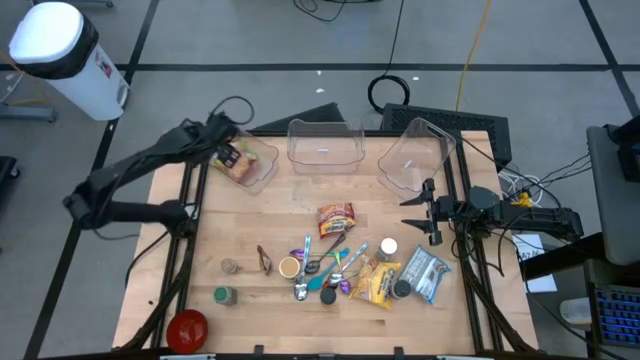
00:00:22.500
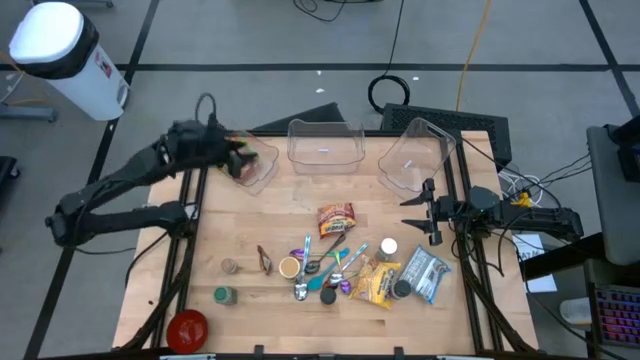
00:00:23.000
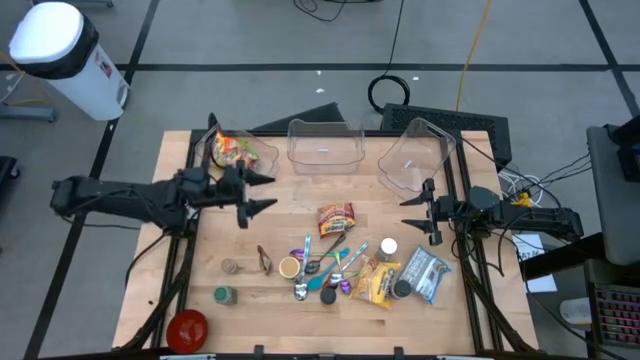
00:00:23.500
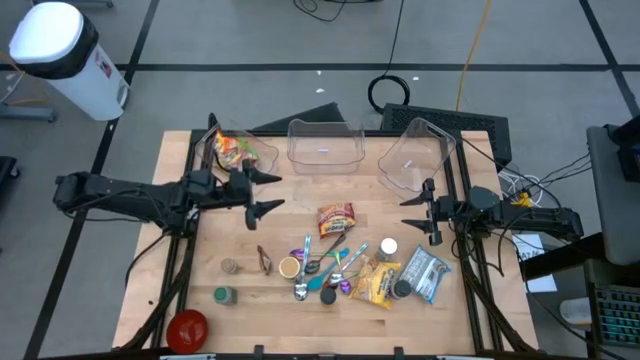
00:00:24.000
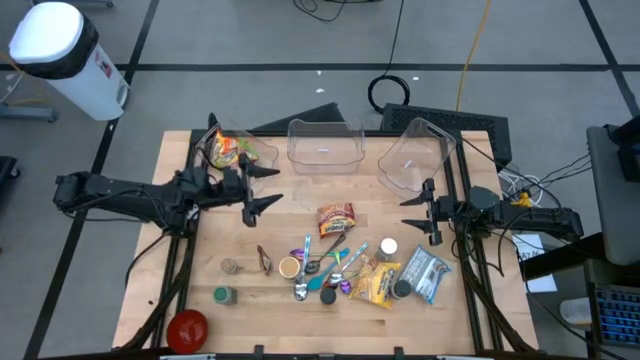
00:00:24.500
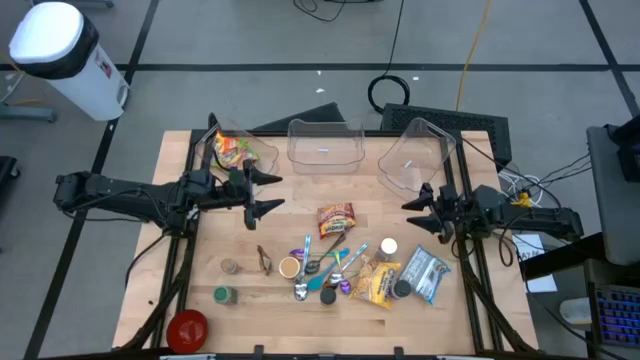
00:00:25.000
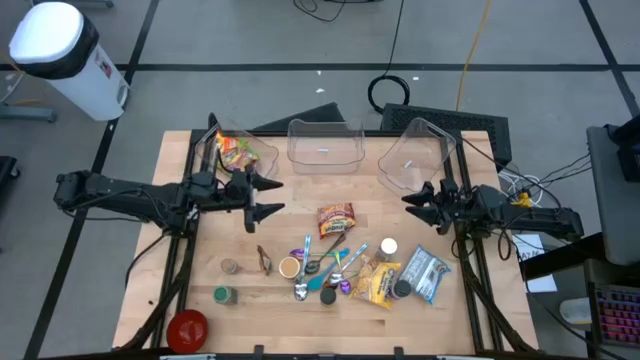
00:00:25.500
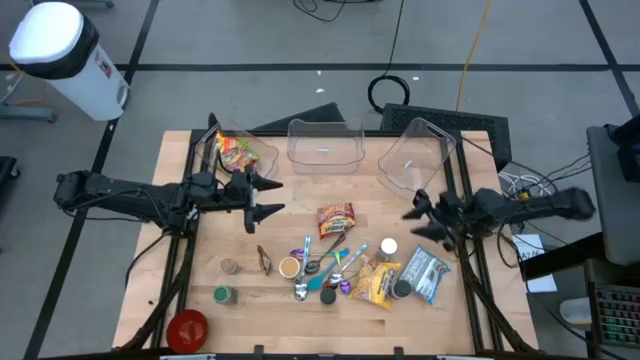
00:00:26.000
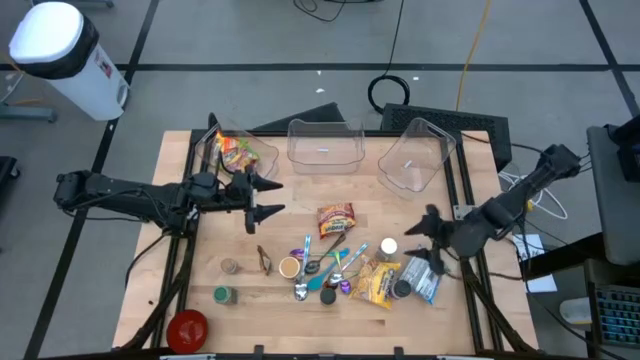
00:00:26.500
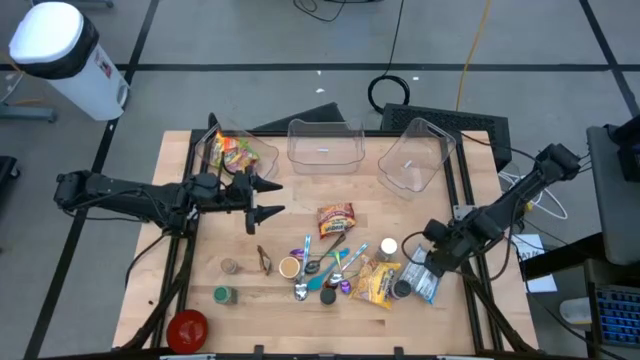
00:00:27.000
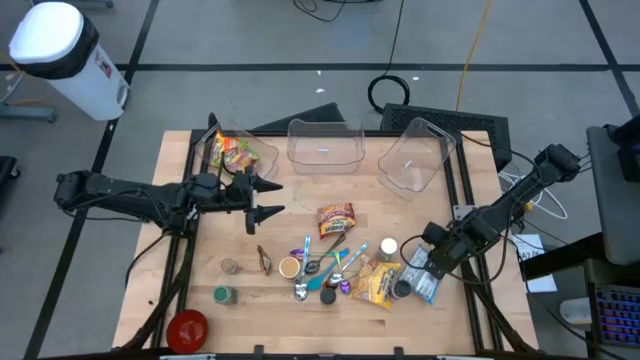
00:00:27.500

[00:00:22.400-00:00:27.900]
Task: Pick & Place Food Item
Put the blue noodle pack into the left transparent bin

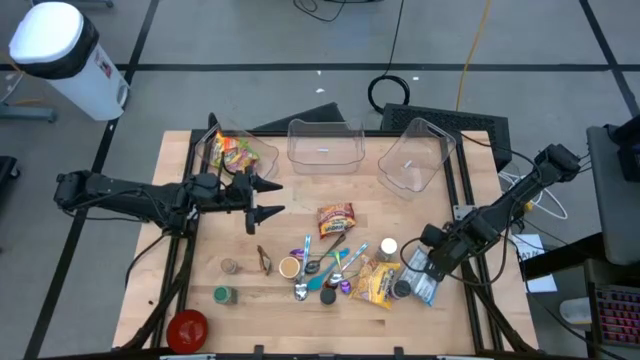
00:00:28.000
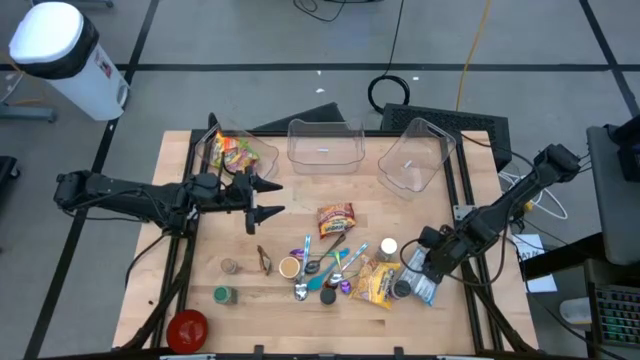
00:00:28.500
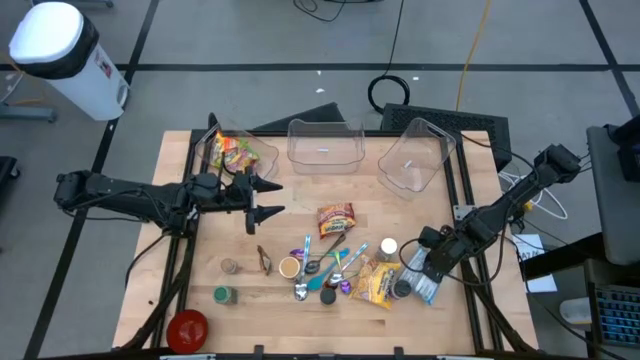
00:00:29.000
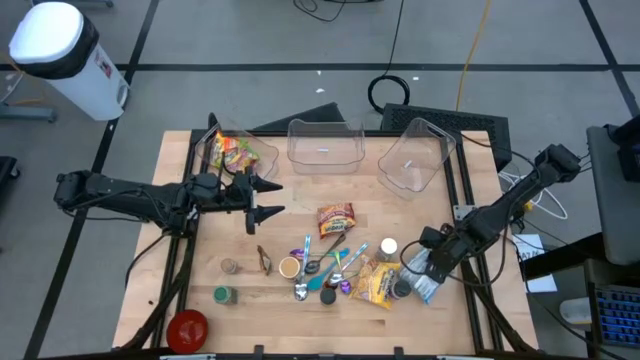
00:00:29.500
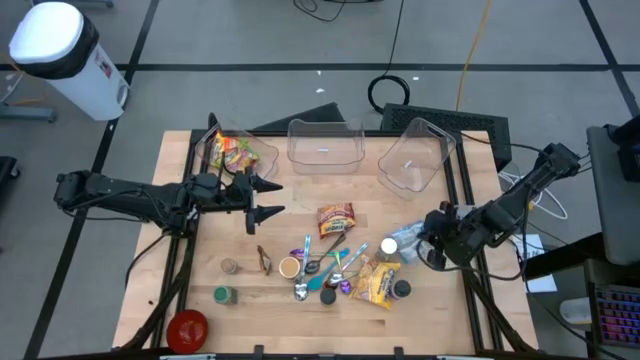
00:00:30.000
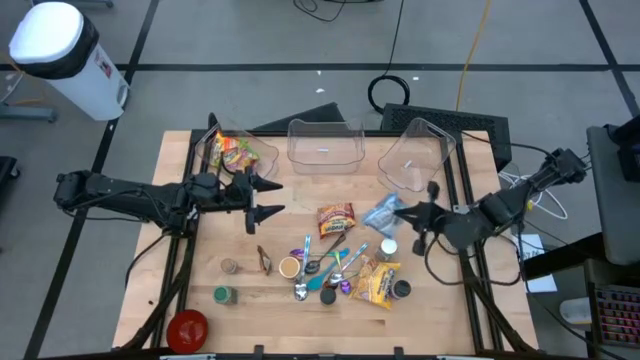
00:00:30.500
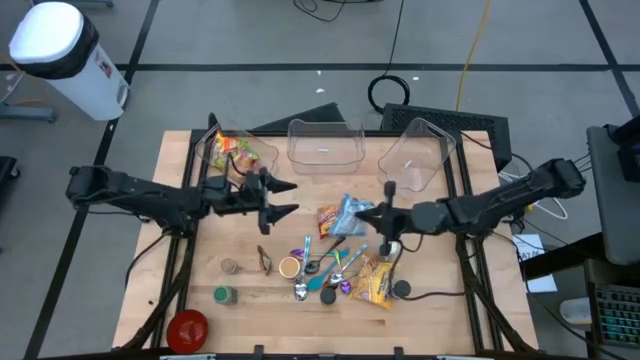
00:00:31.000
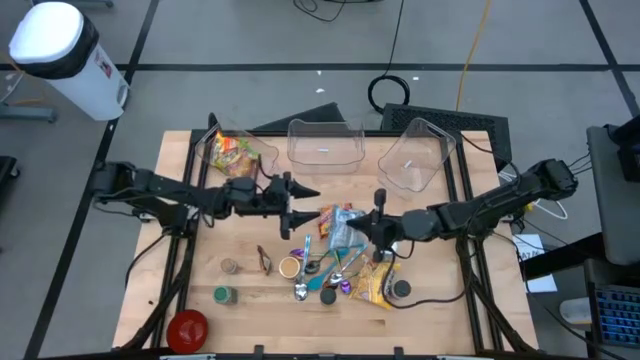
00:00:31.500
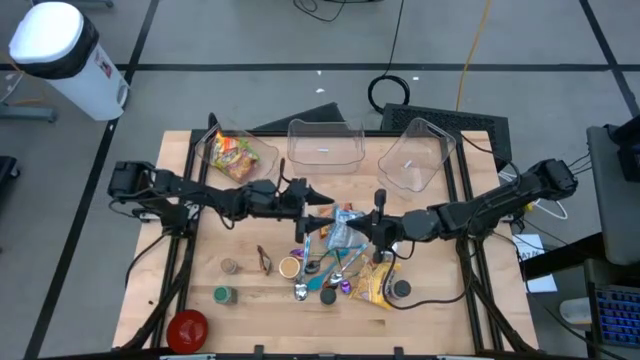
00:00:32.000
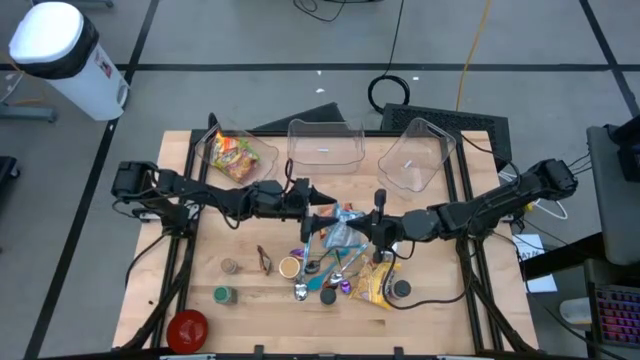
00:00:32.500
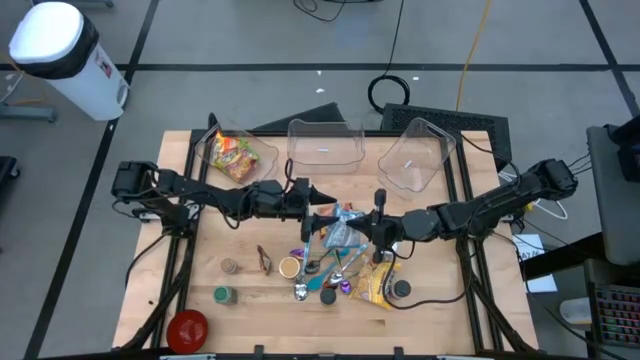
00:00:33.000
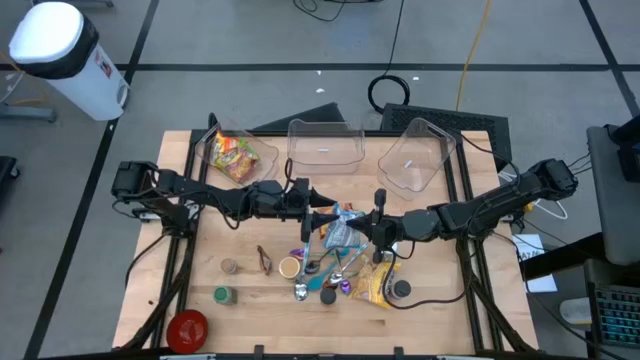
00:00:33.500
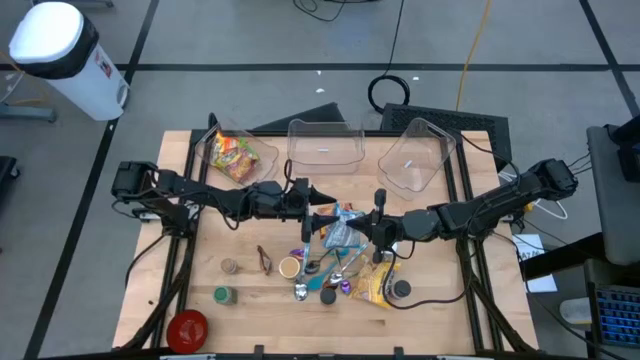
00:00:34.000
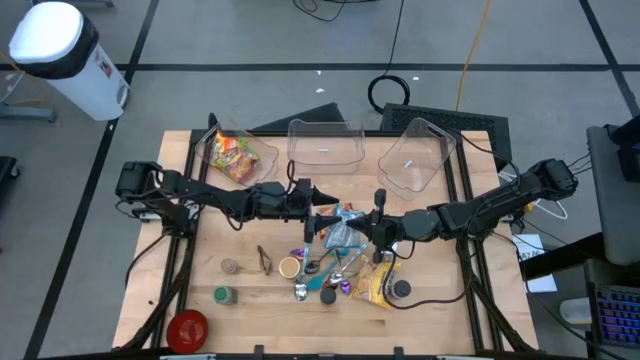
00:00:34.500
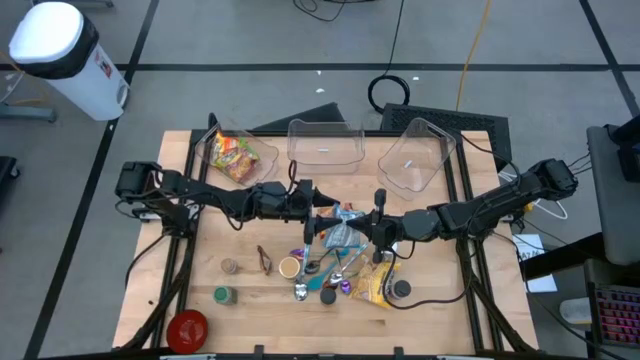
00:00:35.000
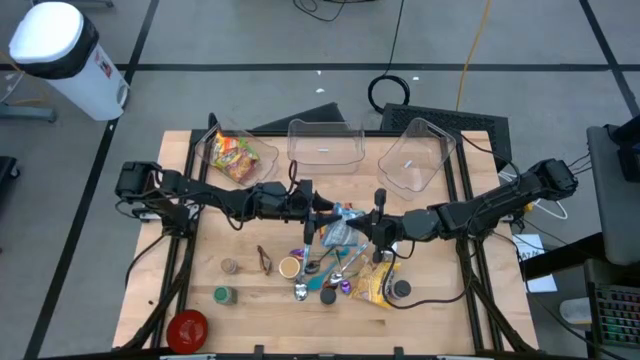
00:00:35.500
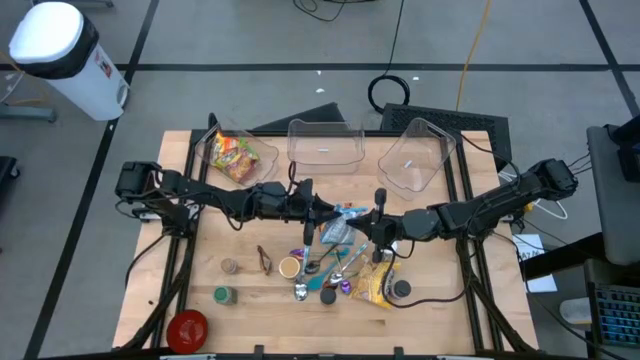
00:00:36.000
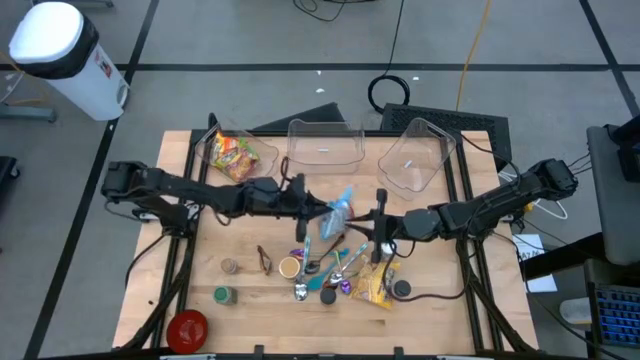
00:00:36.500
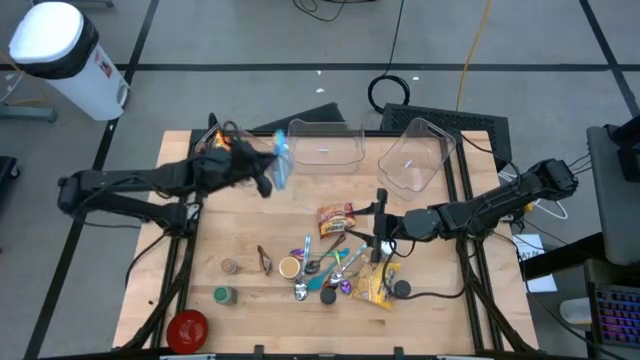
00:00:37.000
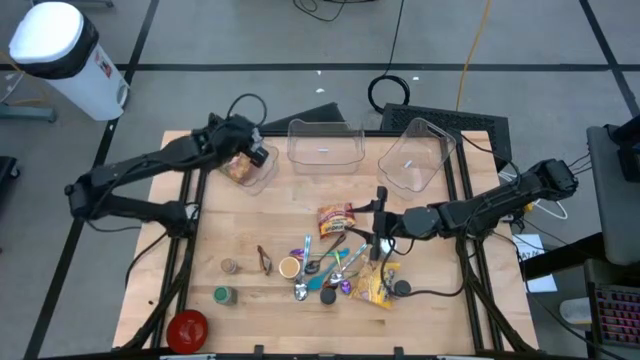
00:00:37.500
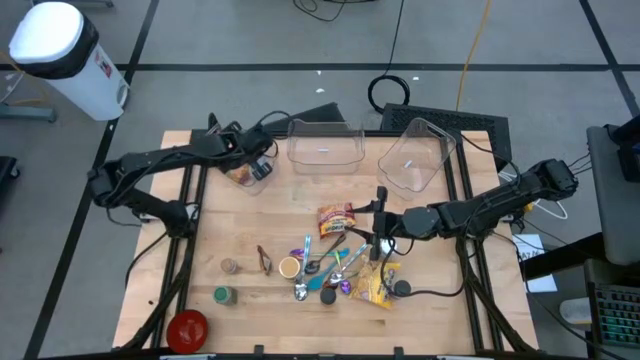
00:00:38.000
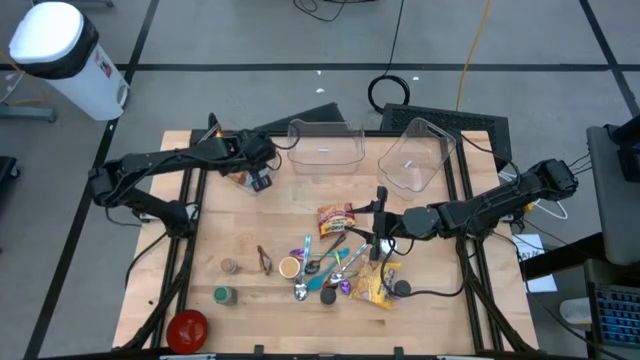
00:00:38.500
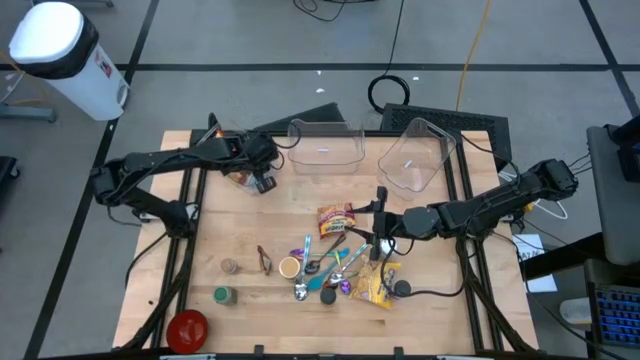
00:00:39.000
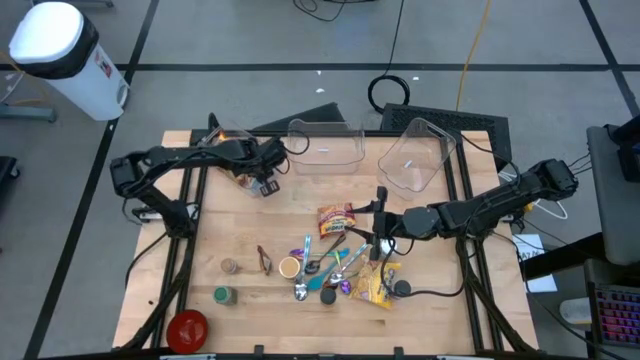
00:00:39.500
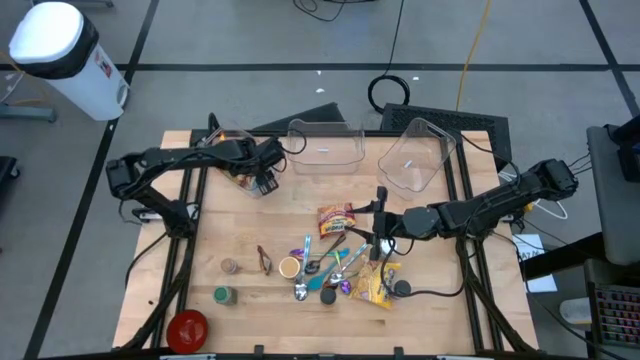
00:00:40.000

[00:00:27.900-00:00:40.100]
Put the blue noodle pack into the left transparent bin

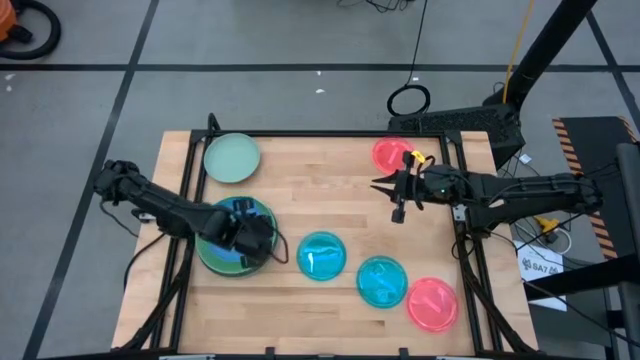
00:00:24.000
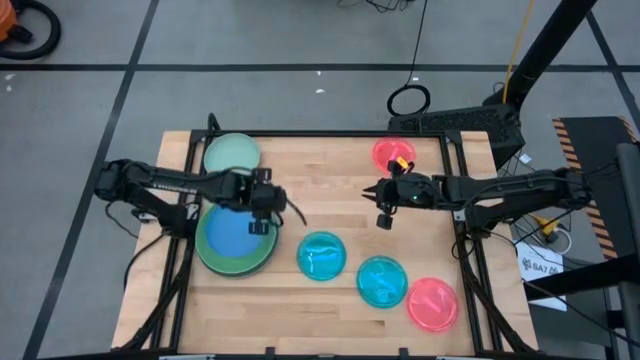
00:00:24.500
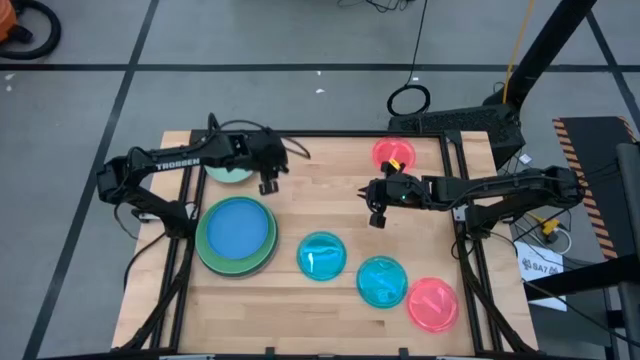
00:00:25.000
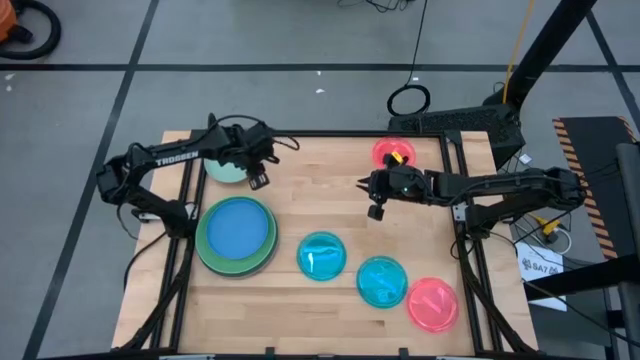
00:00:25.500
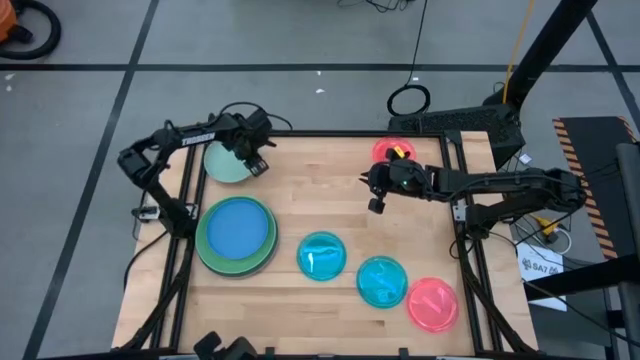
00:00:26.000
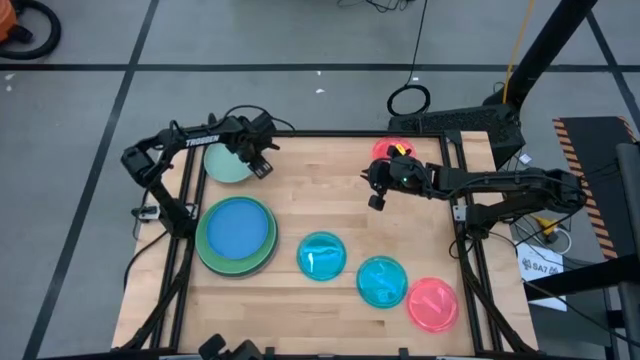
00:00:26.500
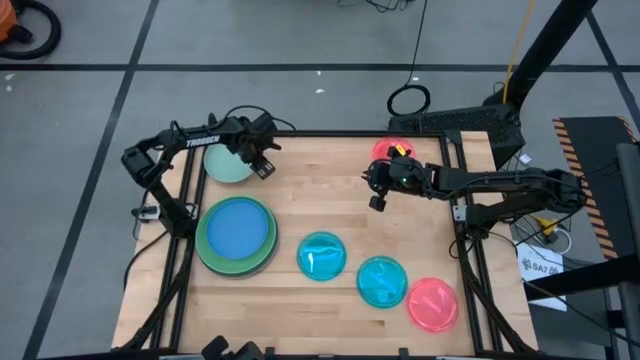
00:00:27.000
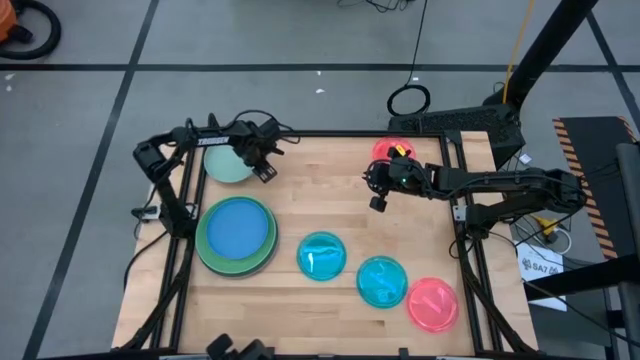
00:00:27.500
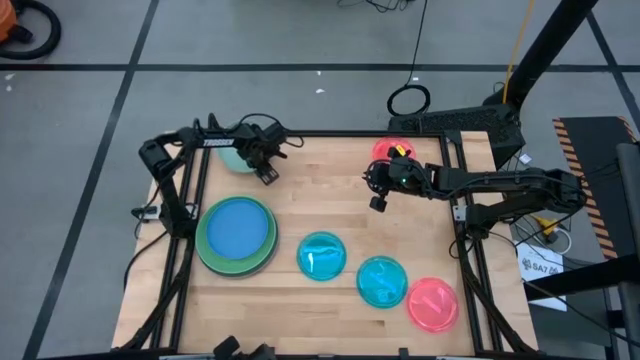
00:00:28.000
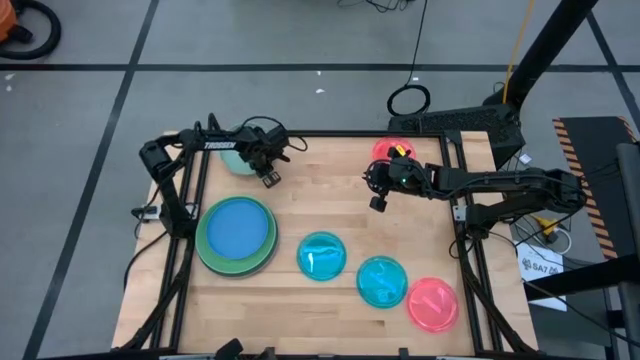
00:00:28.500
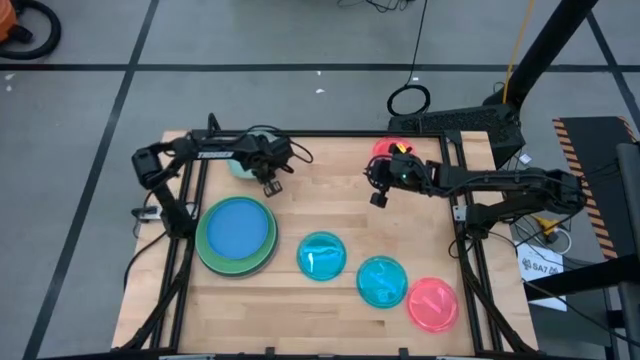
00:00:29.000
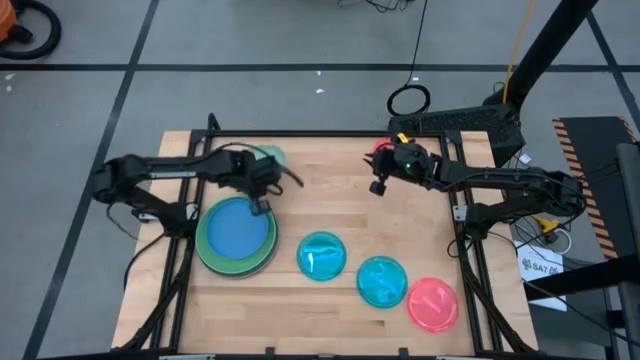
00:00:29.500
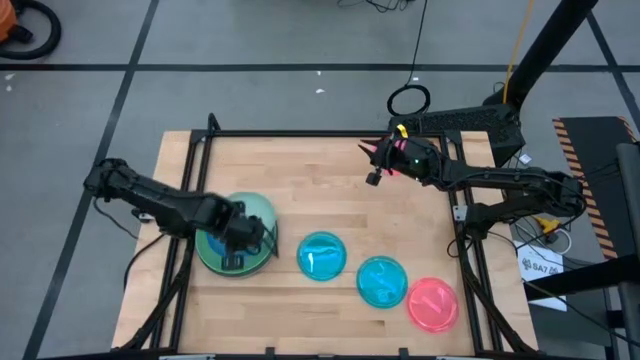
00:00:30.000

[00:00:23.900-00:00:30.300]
Task: Stack plastic plates
Stack the light green plate on top of the blue plate
